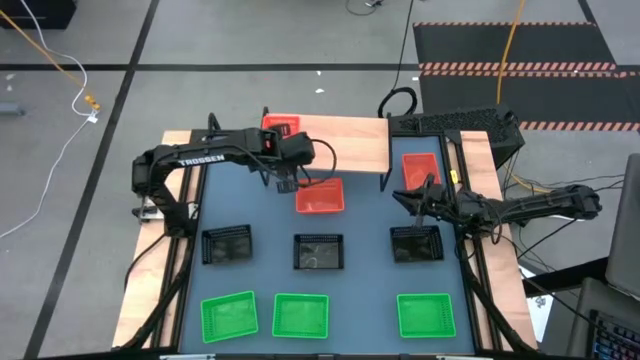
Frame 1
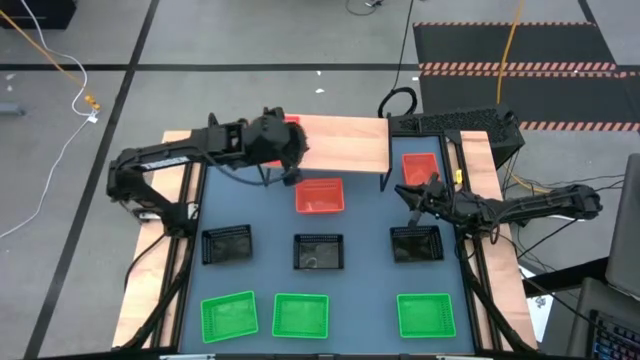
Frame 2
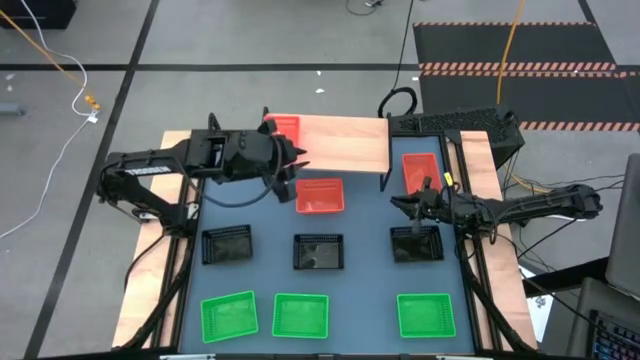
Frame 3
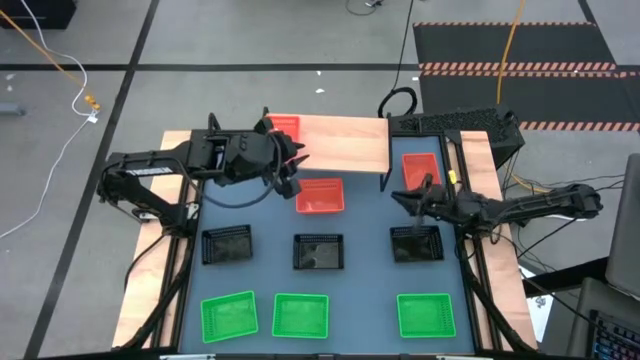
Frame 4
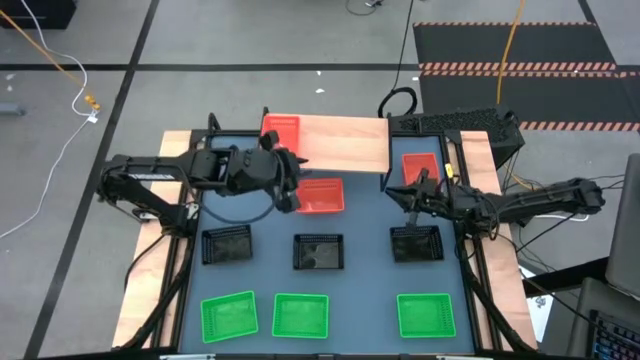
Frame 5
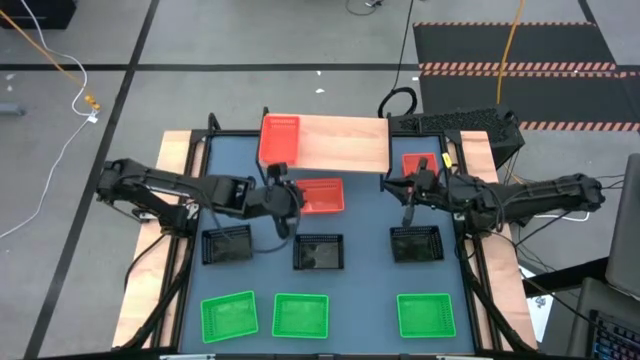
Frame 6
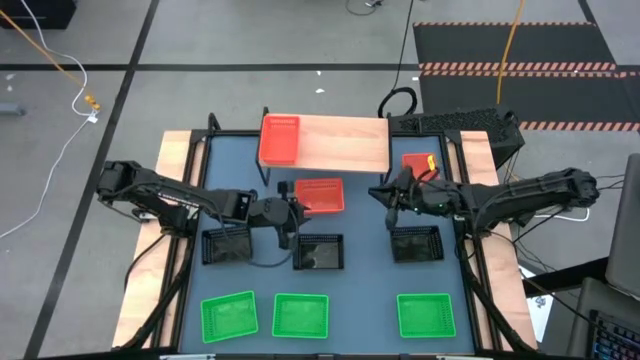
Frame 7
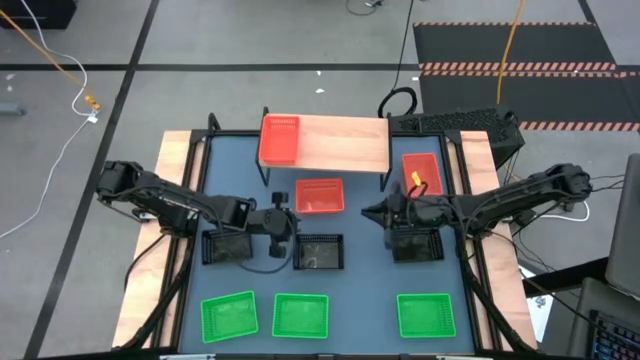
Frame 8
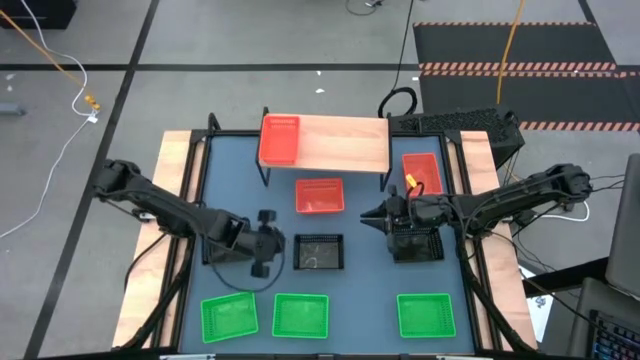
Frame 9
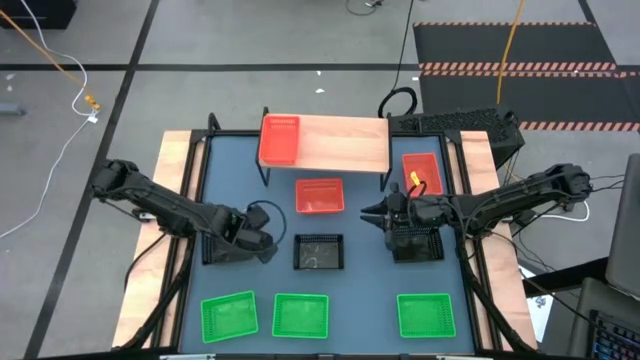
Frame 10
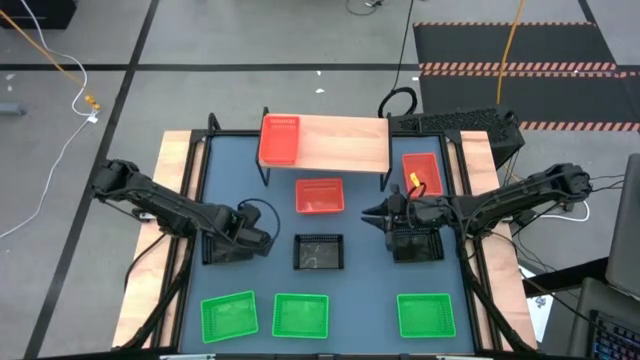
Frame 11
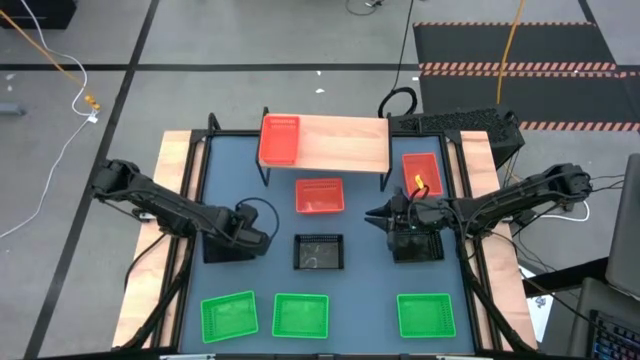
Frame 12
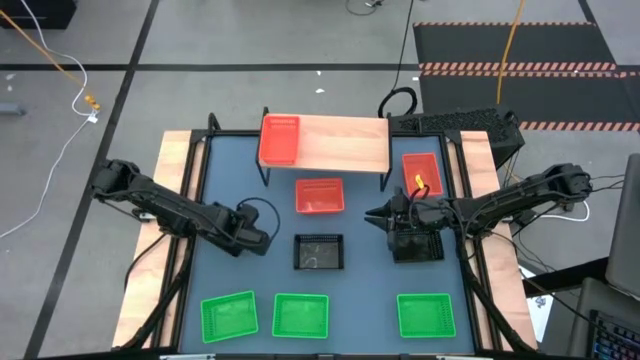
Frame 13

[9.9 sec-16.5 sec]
Task: Stack baskets on shelf by color
Put the left black bin on the shelf

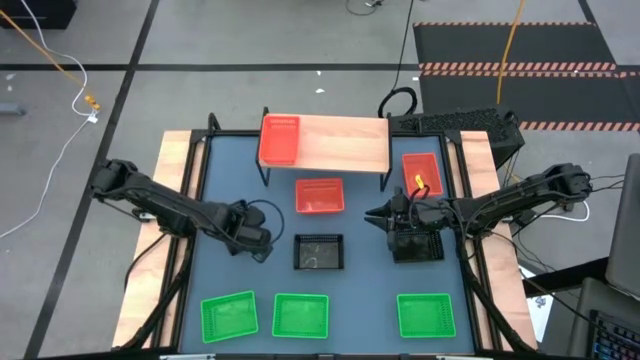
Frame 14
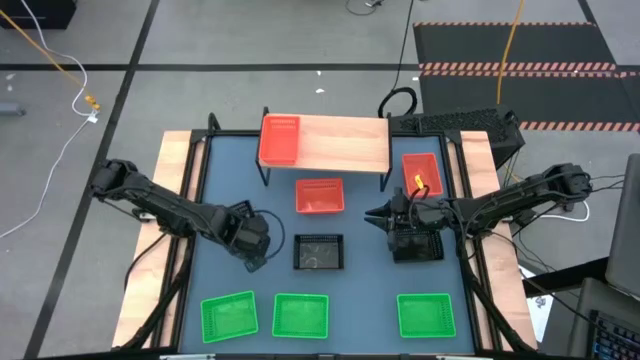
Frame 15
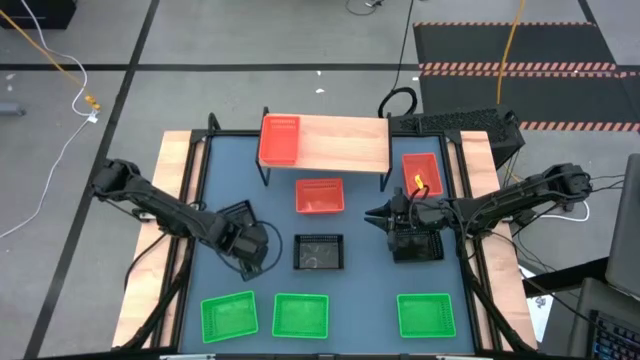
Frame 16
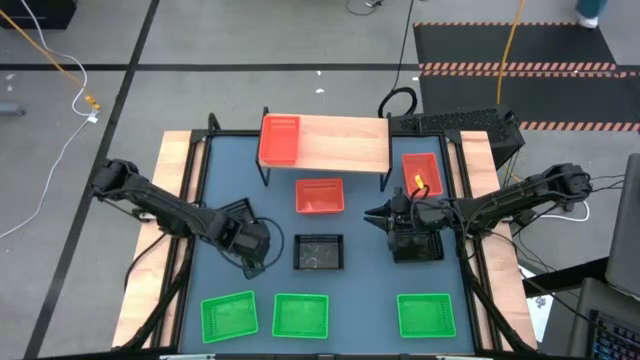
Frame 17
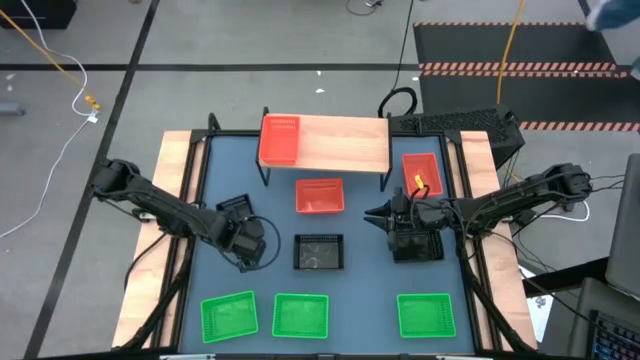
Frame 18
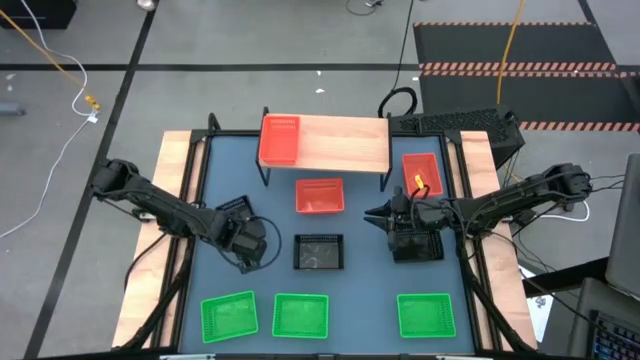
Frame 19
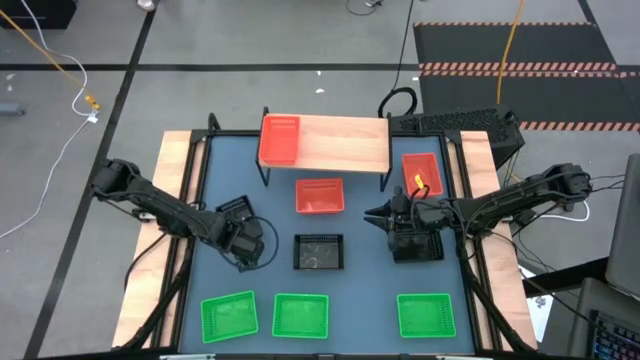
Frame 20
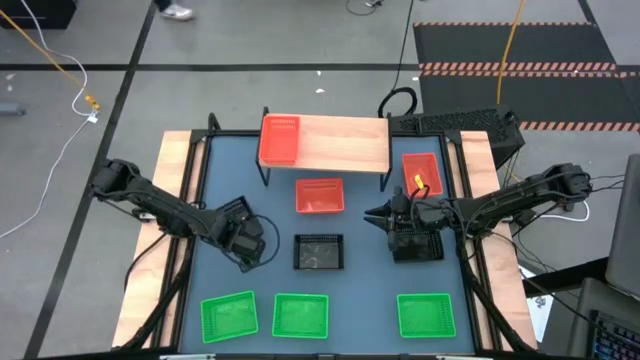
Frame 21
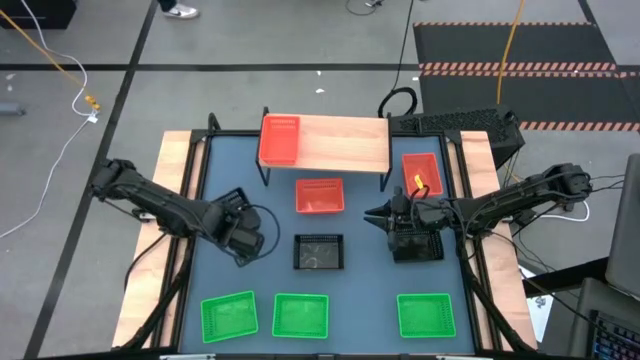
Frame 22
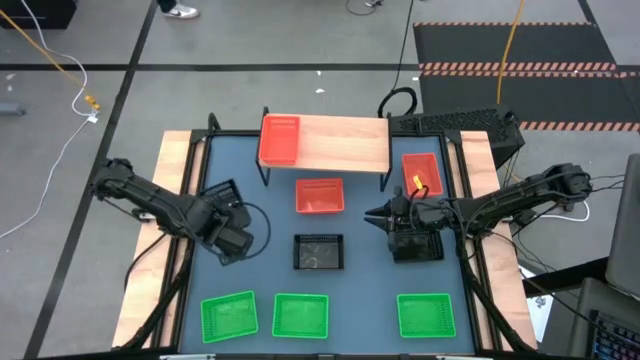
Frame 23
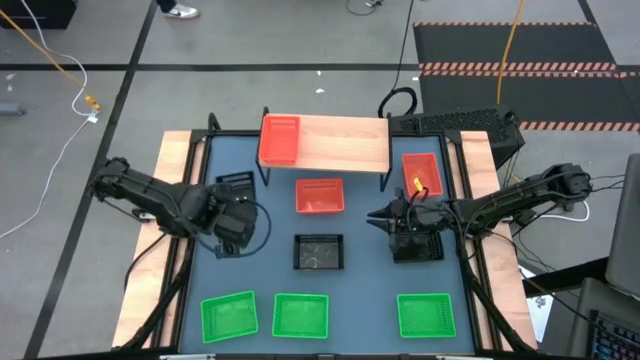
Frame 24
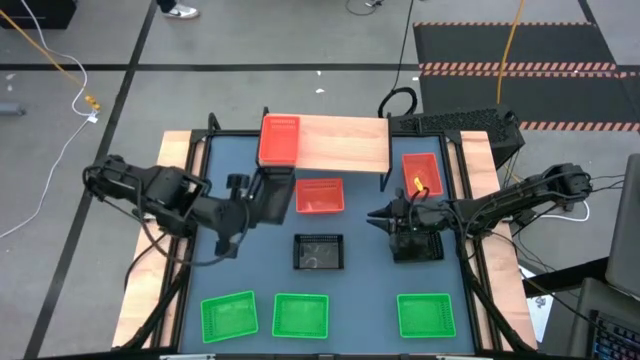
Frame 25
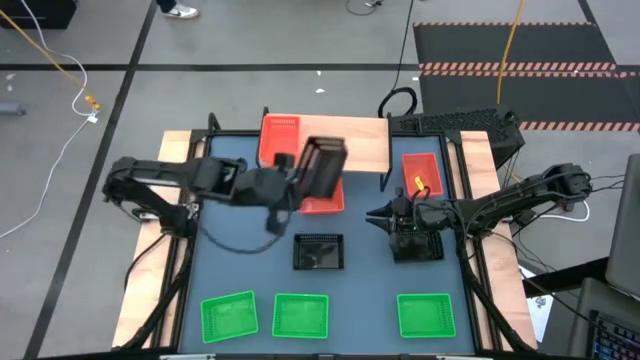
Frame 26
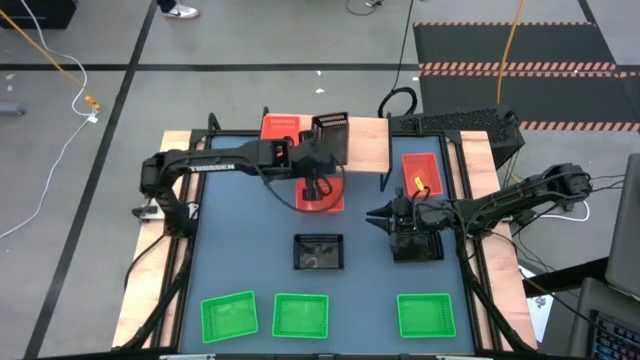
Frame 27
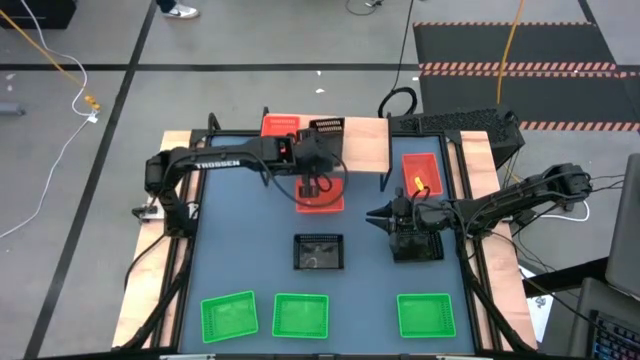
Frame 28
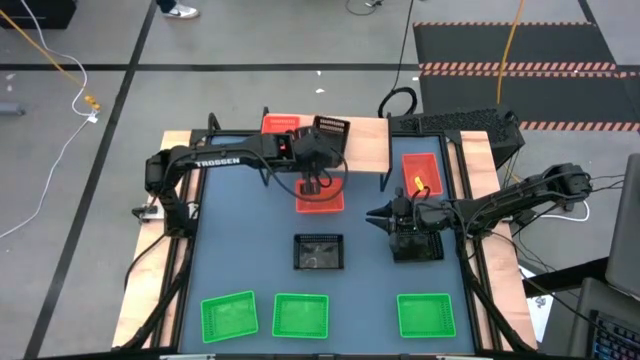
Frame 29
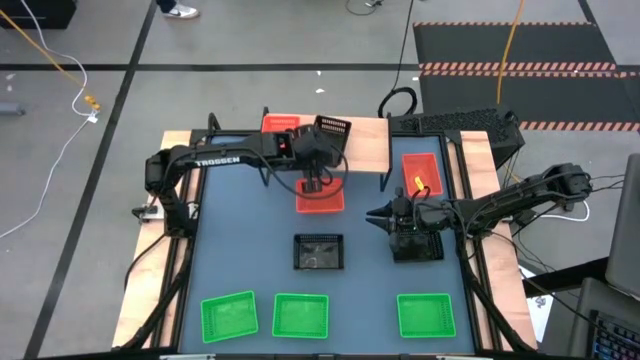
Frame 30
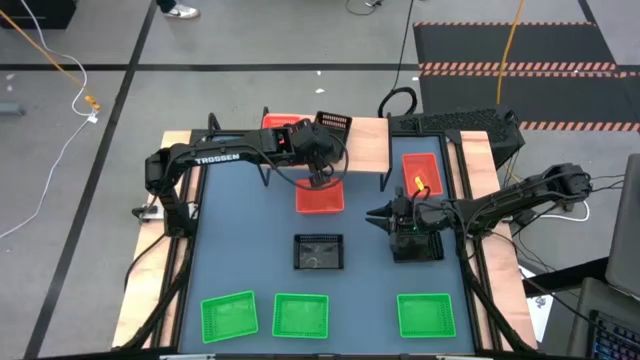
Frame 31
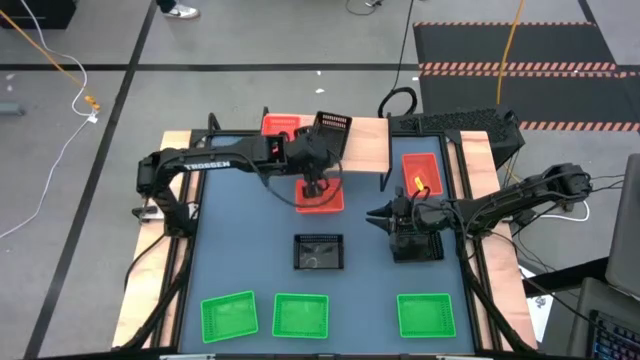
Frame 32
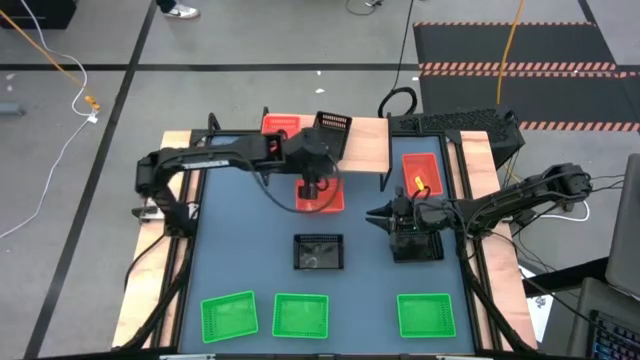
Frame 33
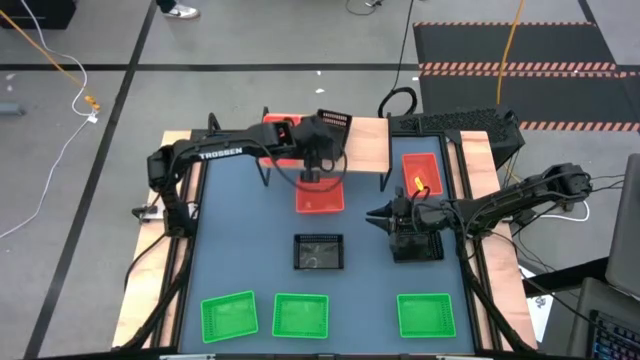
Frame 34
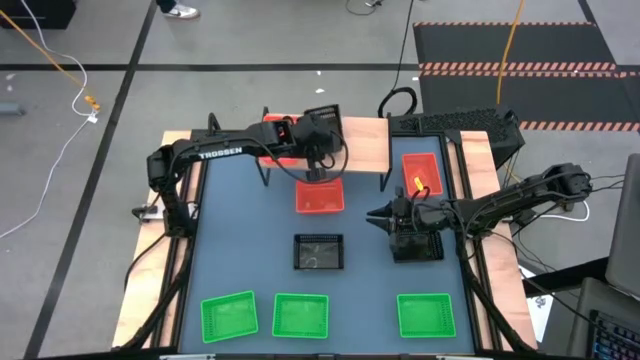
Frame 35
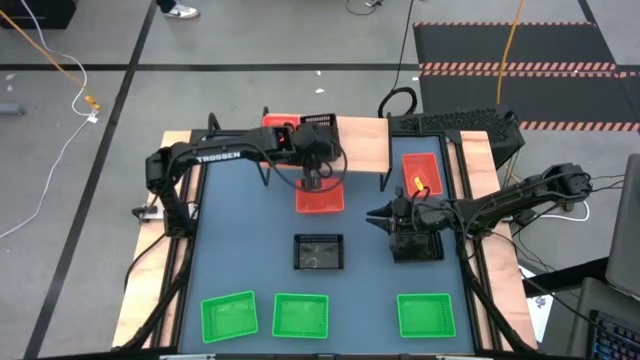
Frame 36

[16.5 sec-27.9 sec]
Put the left black bin on the shelf

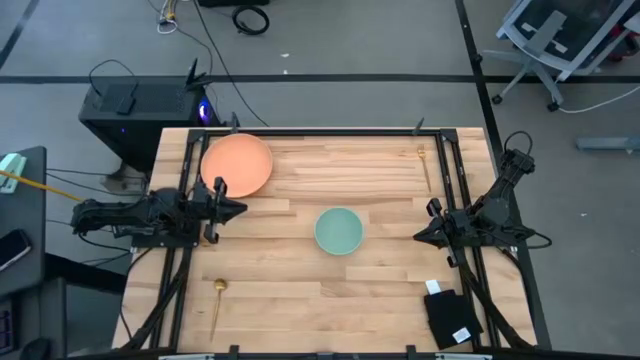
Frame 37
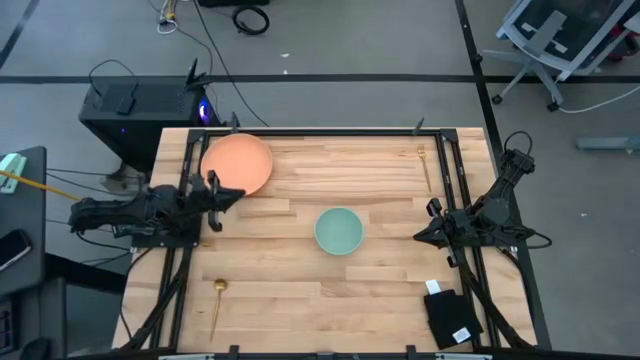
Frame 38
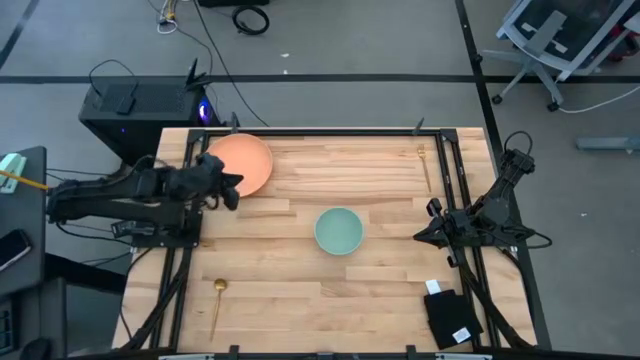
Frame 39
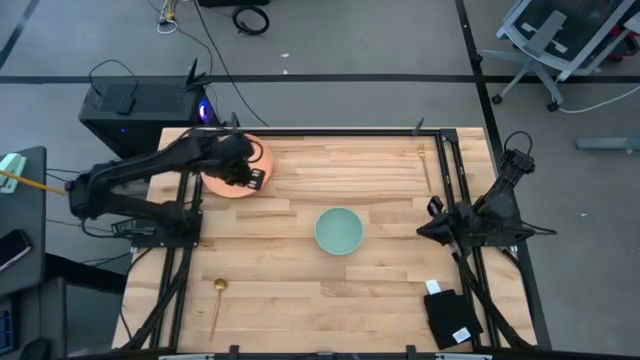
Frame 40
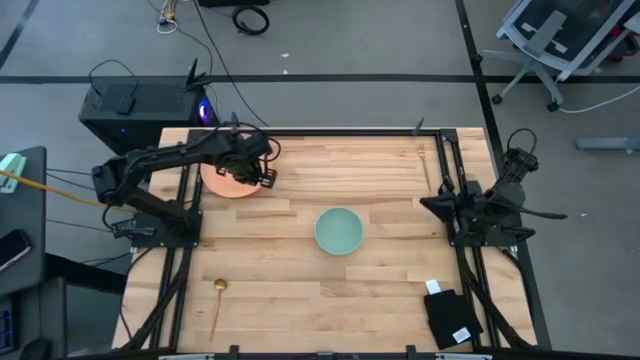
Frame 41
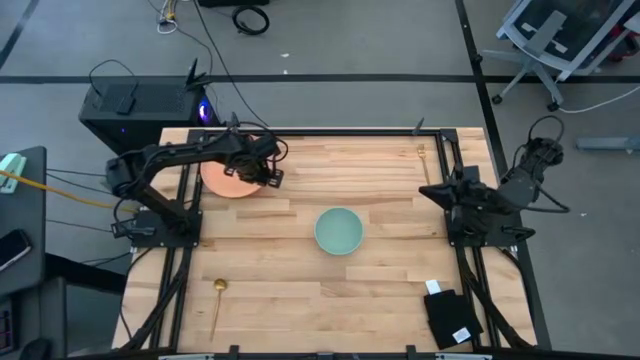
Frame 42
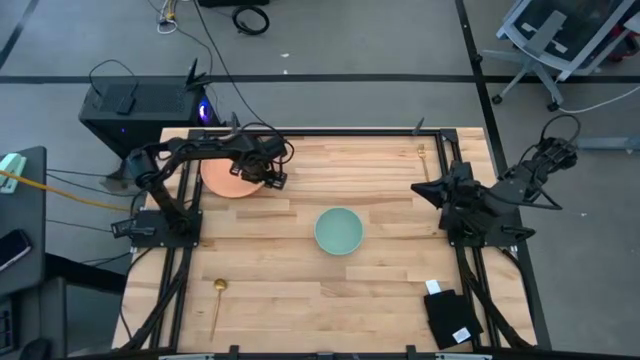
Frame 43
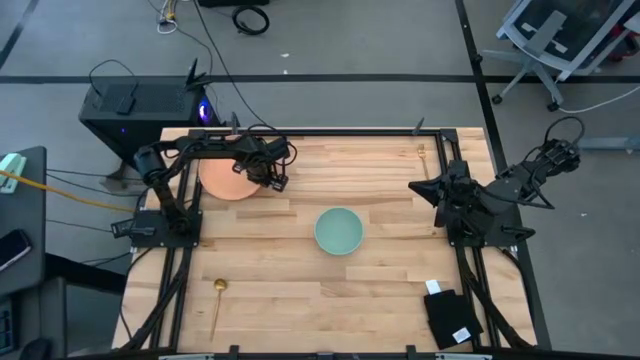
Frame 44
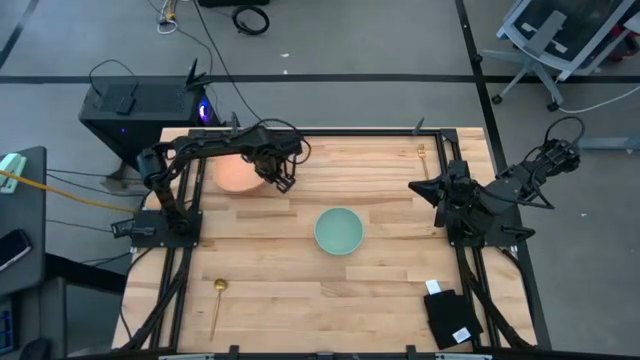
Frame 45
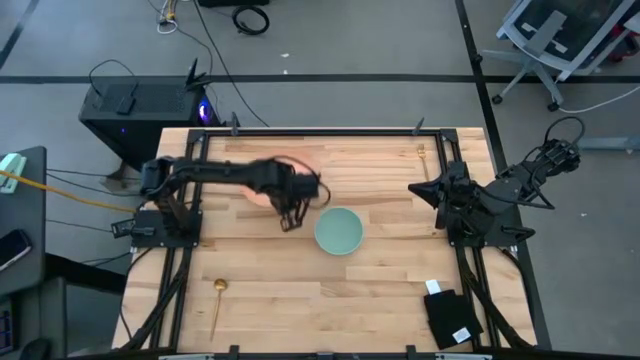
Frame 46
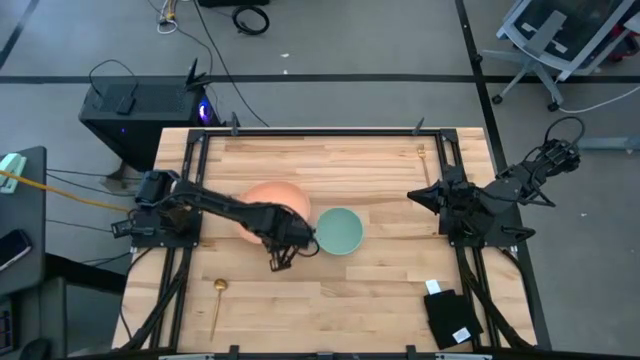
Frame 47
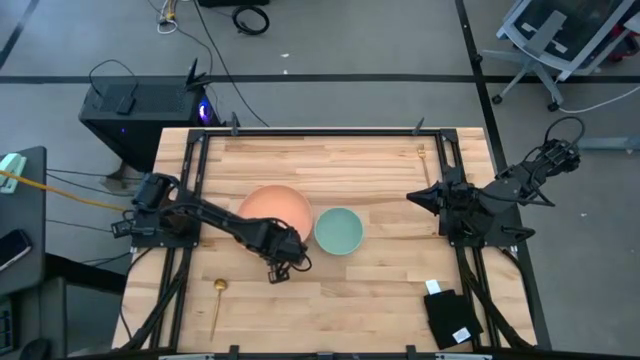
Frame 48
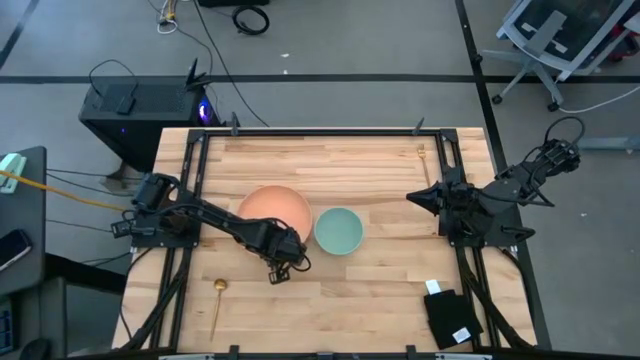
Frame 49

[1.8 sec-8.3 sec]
Task: Set table place
Move the plate from the top left to the middle left of the table
